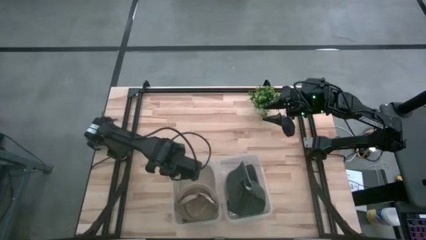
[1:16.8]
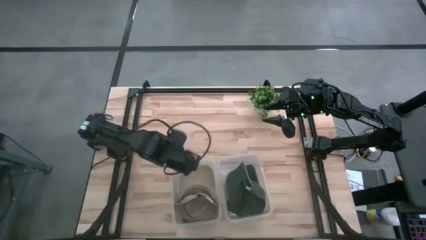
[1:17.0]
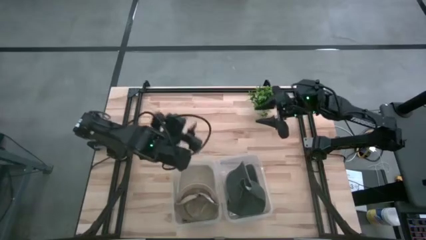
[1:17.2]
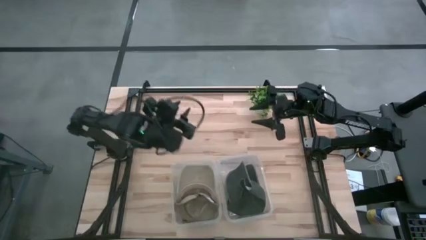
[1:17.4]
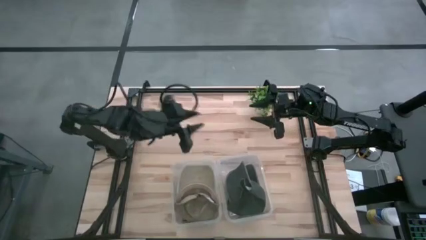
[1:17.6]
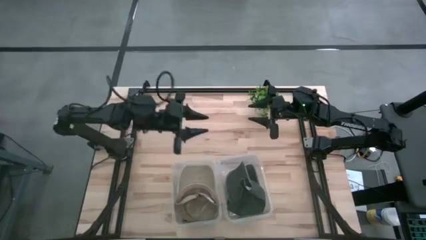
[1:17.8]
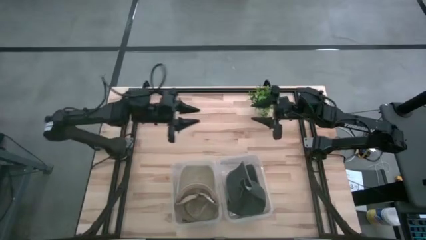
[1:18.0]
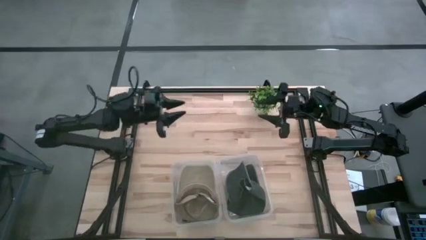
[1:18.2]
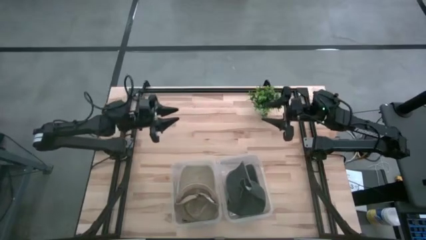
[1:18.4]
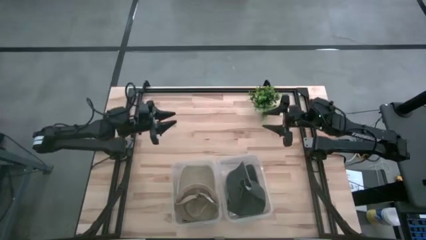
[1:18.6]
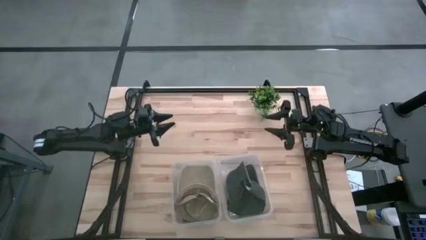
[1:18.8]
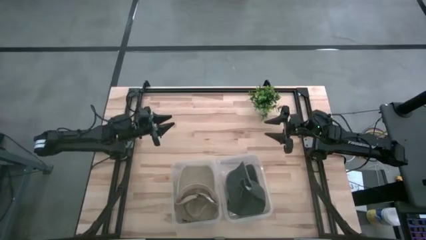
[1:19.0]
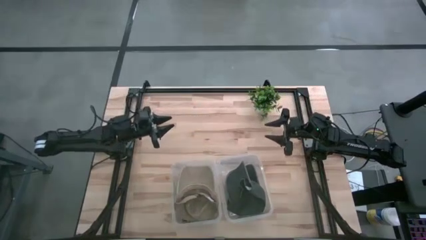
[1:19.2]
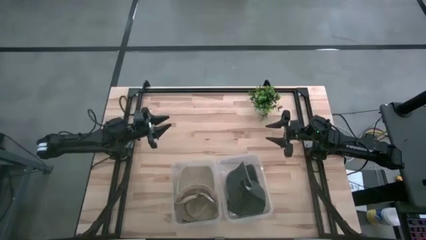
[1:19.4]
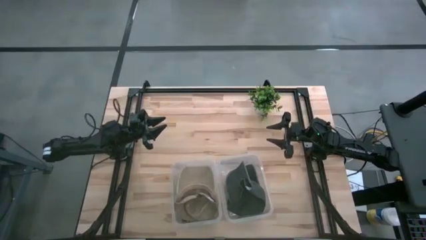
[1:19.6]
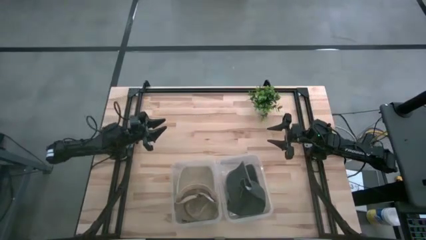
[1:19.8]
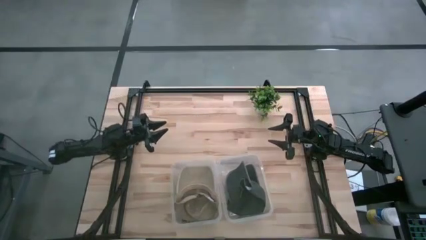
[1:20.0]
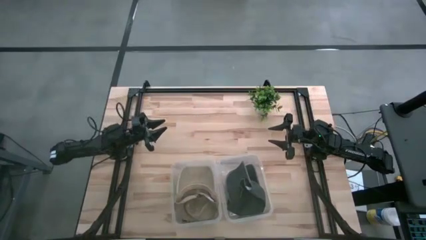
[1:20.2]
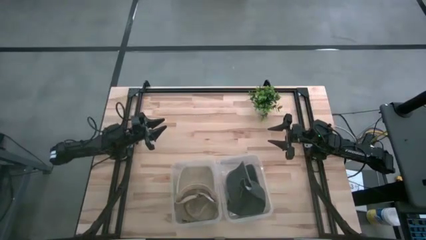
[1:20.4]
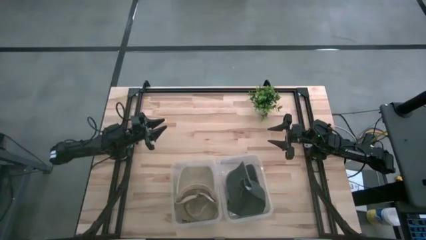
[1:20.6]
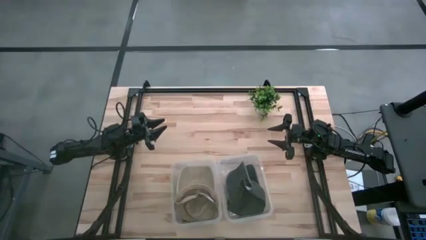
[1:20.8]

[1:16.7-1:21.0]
Task: Pick & Place hat
Return to Home Position

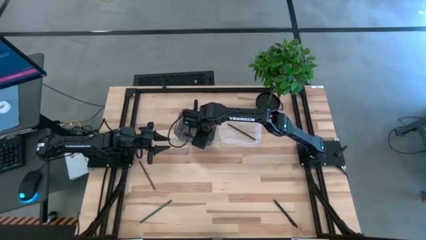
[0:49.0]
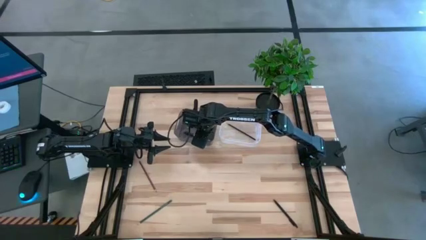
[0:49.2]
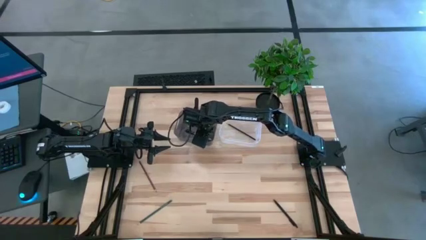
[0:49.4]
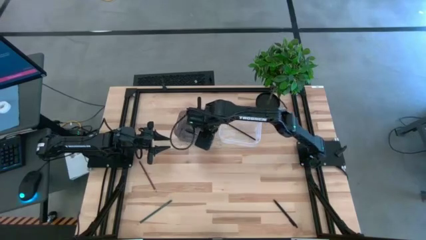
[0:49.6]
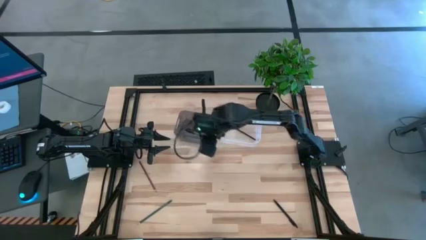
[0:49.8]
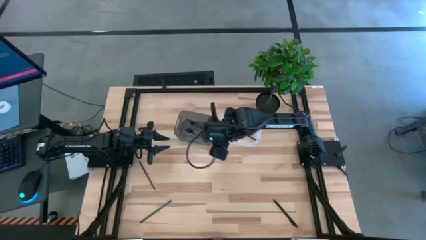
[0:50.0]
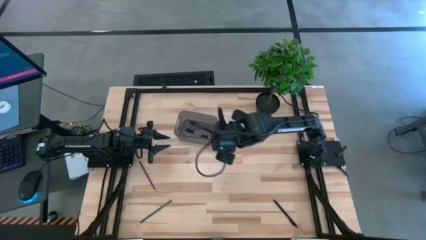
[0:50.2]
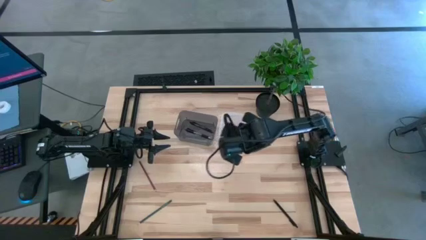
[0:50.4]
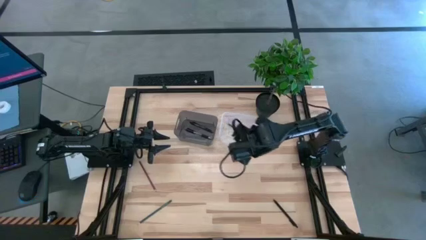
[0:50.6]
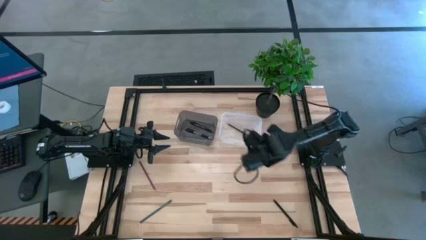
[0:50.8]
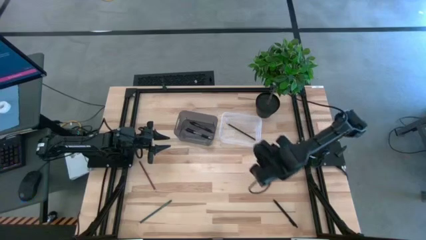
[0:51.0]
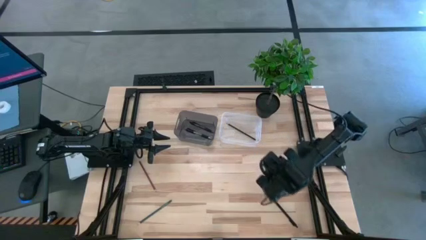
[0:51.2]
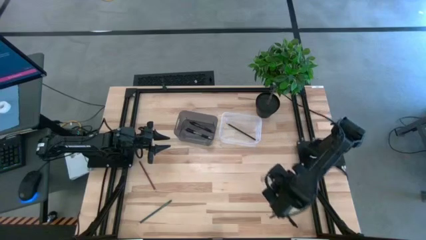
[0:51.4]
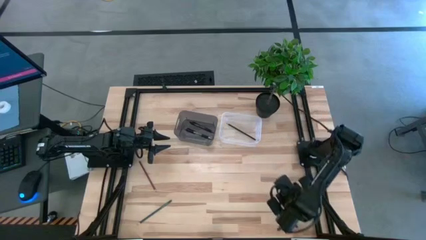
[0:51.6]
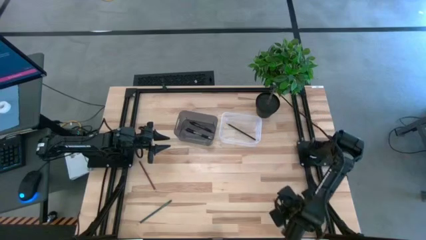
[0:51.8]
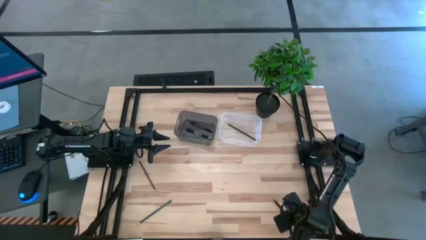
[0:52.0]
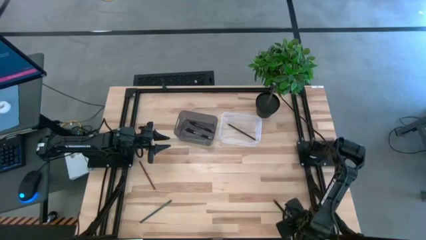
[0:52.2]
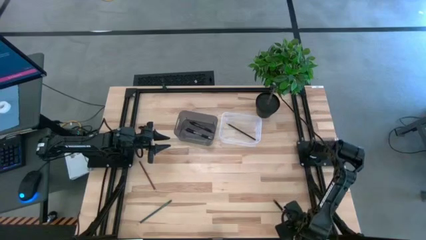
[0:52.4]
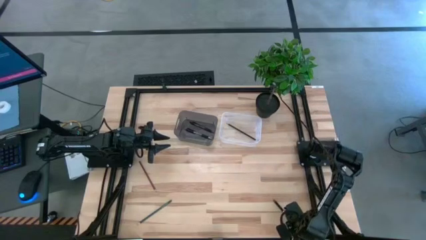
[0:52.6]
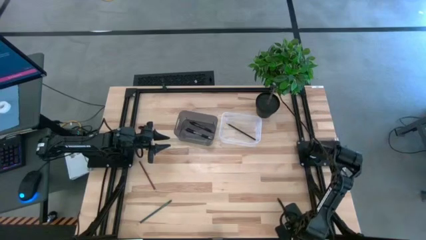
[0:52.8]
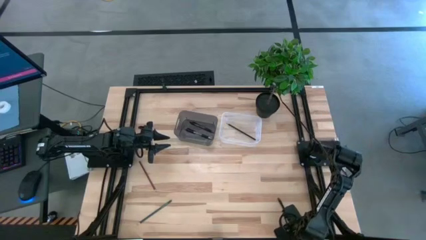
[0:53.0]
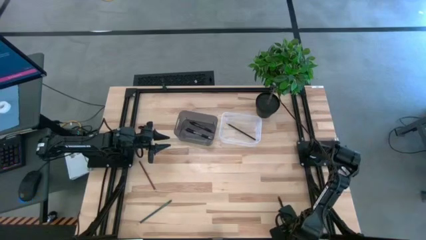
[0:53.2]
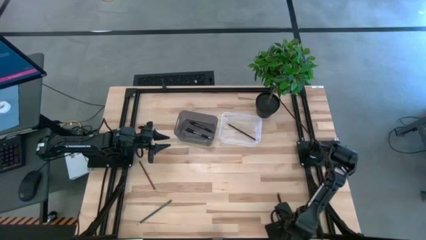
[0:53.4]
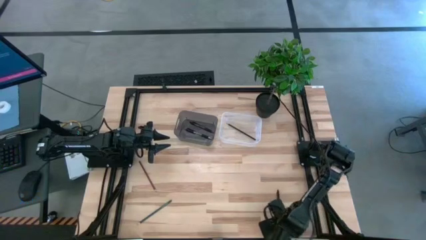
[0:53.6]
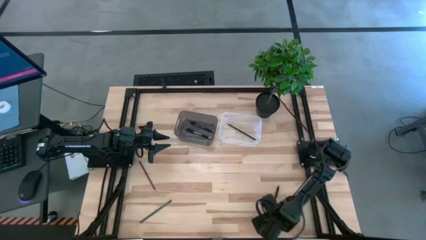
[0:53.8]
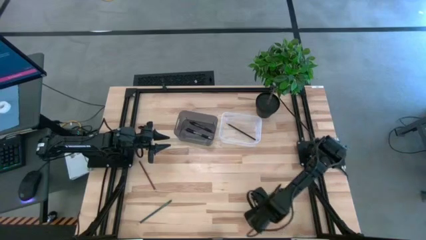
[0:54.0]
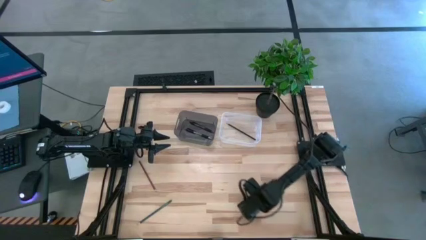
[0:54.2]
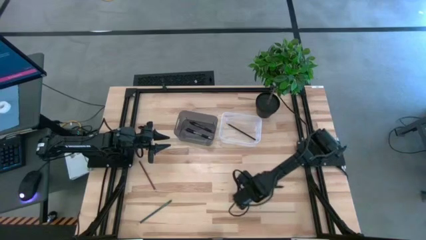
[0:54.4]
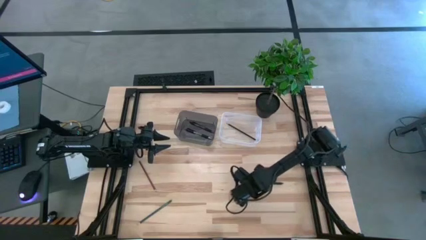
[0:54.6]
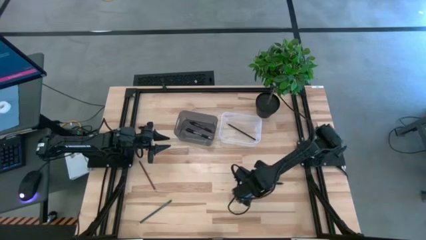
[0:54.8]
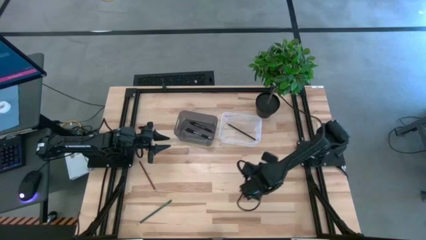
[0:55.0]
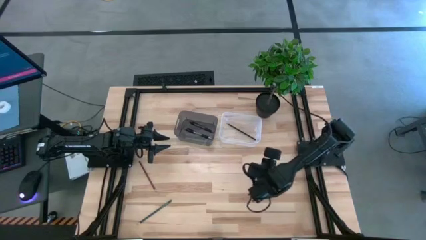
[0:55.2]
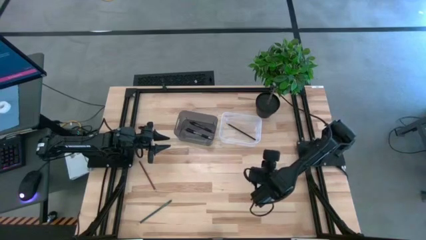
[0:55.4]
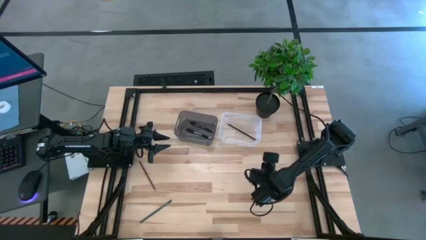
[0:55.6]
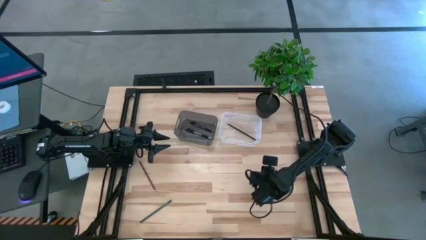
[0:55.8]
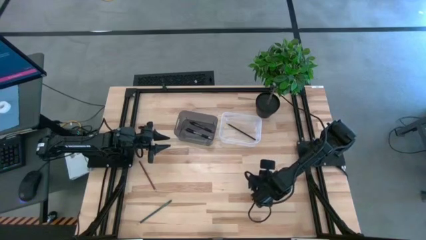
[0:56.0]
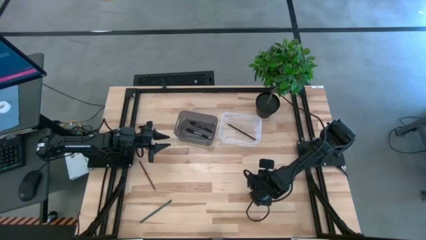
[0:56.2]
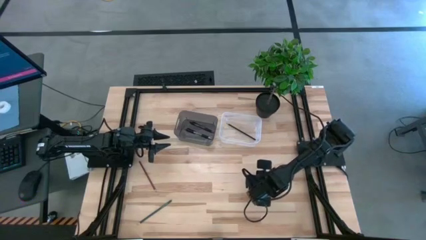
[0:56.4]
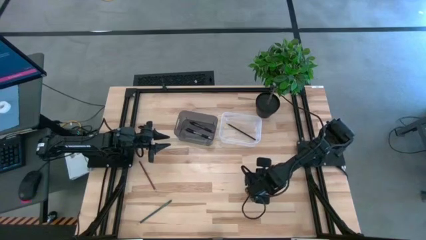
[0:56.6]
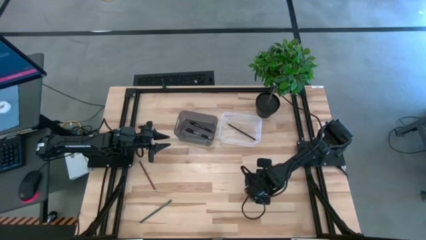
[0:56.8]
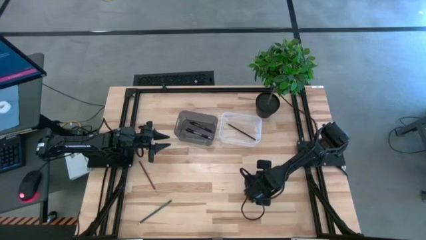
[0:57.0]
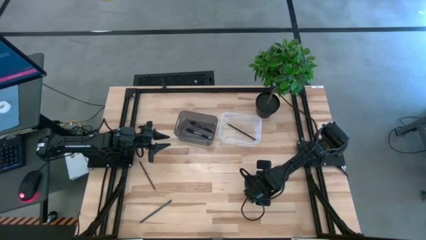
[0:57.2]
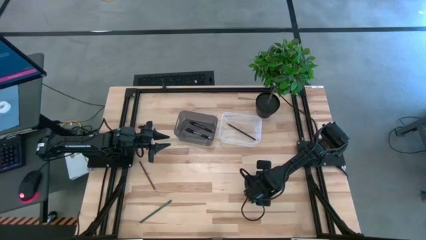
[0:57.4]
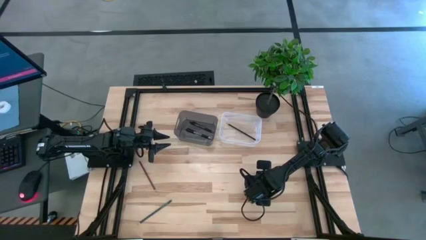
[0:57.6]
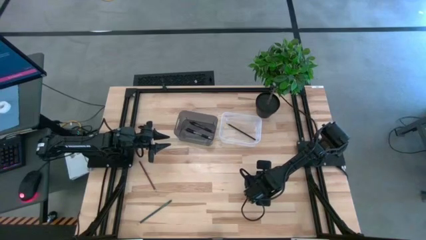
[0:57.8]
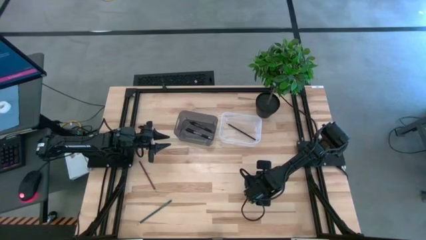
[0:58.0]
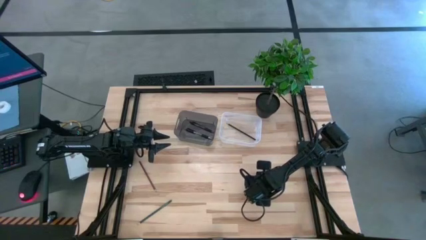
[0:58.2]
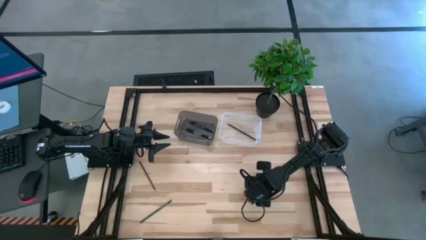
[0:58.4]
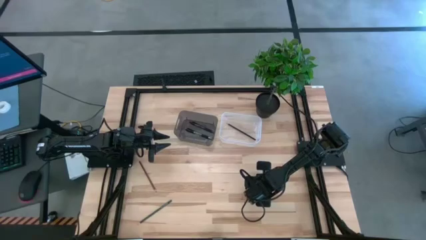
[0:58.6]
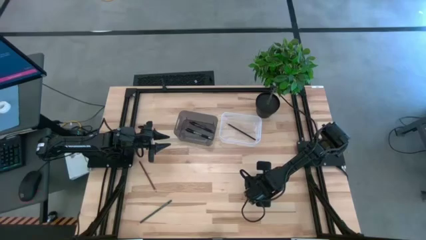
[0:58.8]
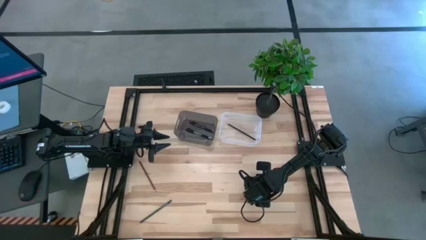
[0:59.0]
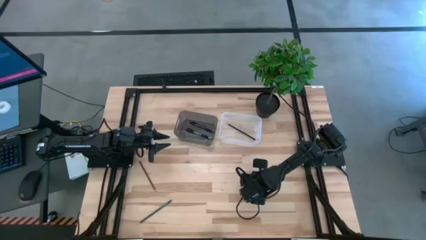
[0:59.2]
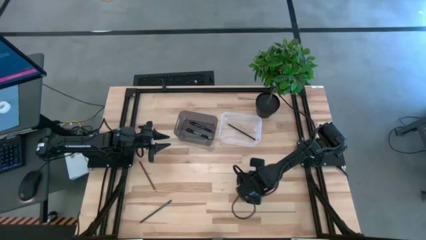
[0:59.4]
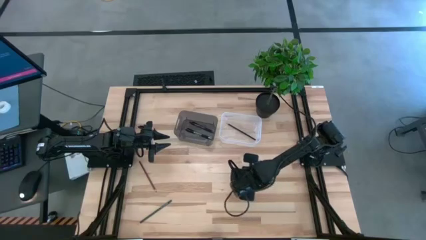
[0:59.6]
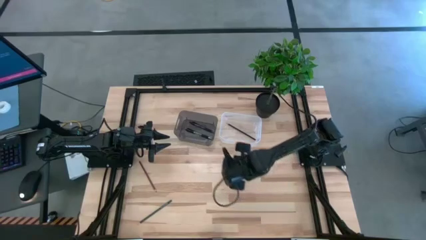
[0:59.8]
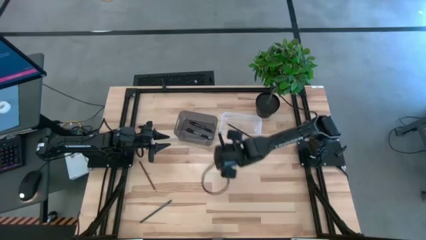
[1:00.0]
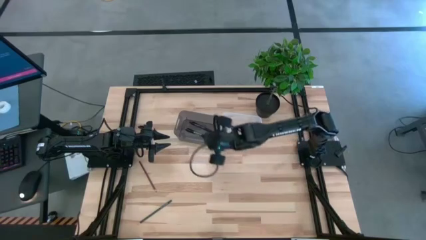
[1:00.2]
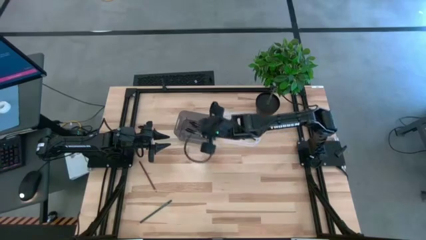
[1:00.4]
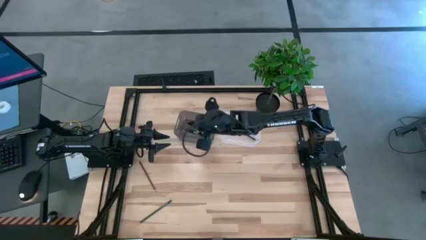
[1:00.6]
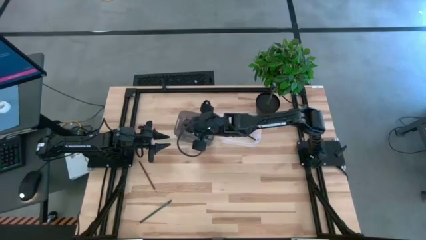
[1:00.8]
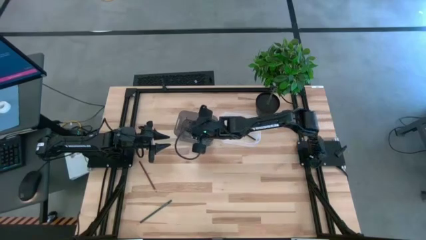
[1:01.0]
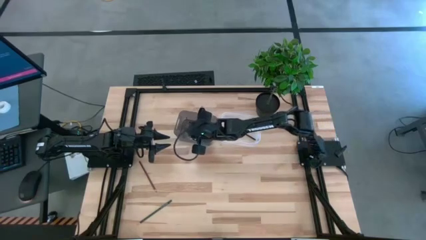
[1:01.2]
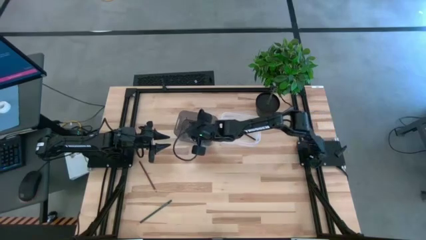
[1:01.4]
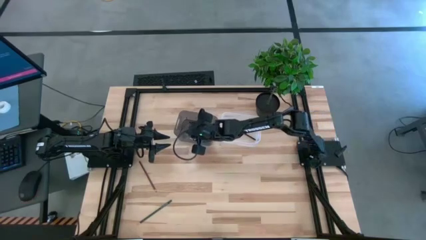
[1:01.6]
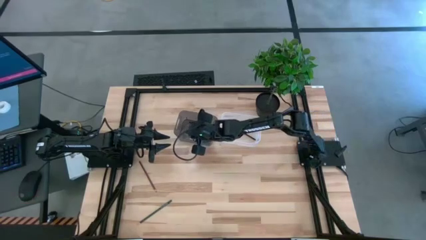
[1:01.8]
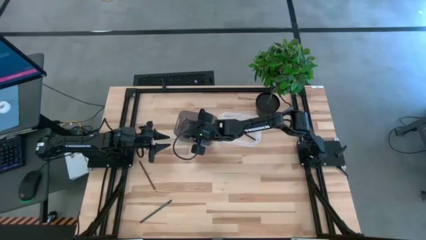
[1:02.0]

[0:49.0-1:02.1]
Task: Sort pens & pencils
Put the black pen into the black bin
